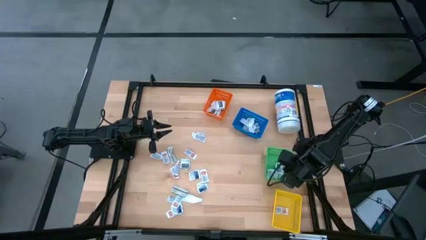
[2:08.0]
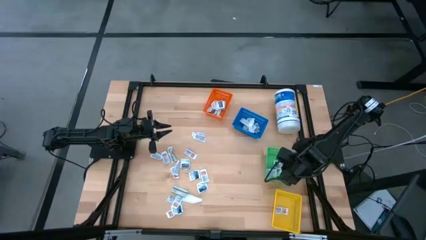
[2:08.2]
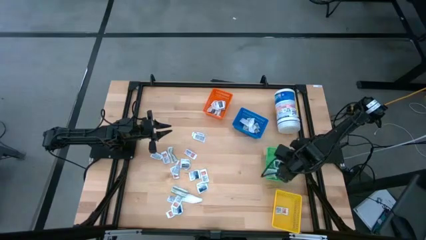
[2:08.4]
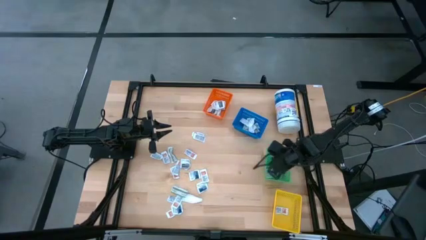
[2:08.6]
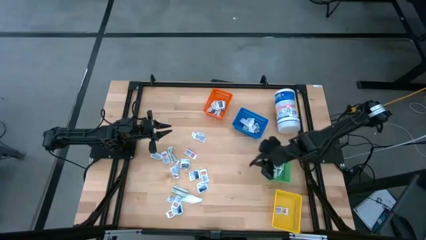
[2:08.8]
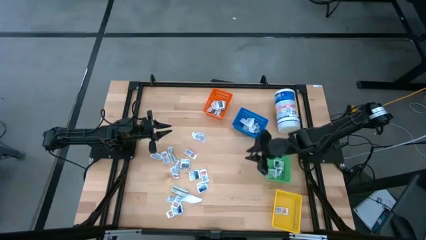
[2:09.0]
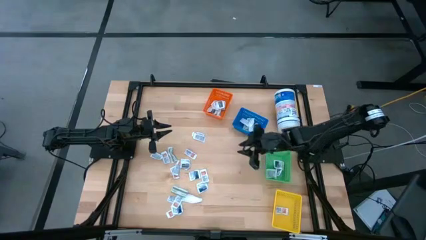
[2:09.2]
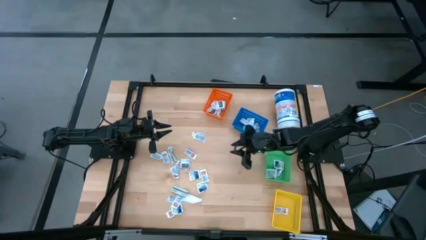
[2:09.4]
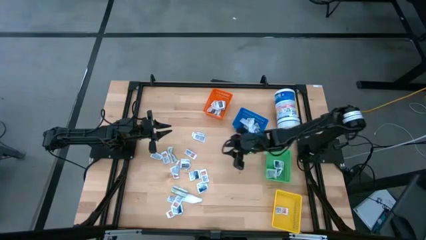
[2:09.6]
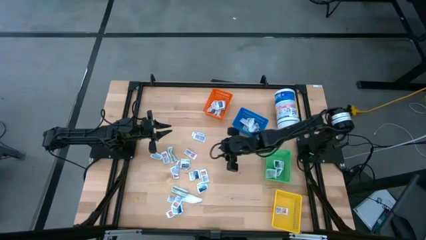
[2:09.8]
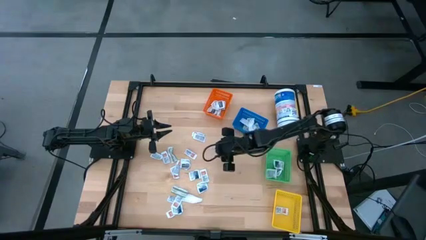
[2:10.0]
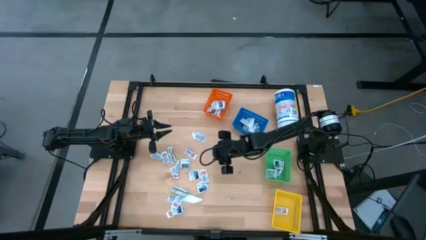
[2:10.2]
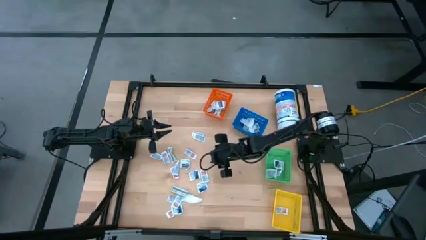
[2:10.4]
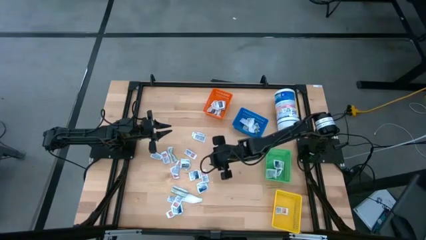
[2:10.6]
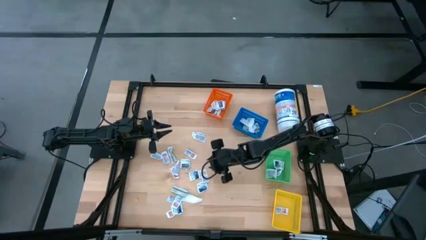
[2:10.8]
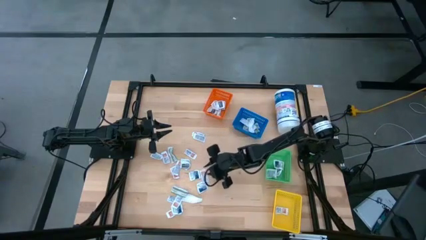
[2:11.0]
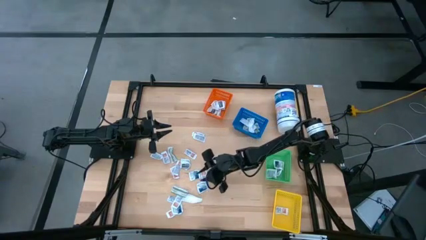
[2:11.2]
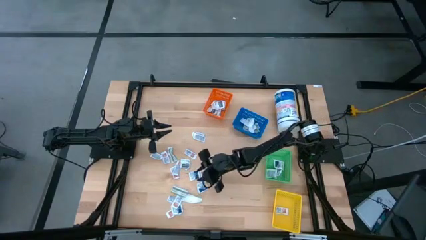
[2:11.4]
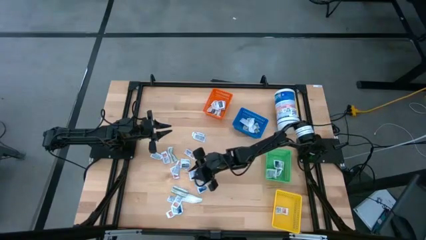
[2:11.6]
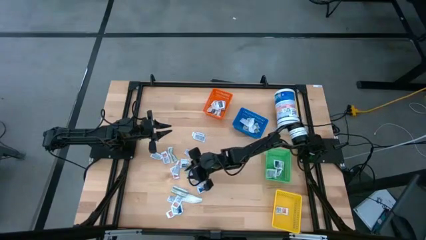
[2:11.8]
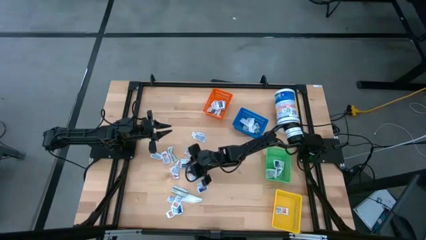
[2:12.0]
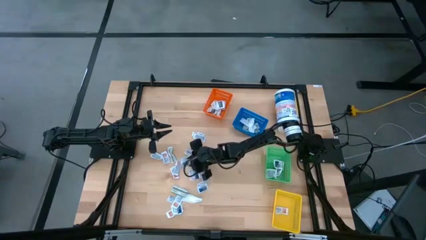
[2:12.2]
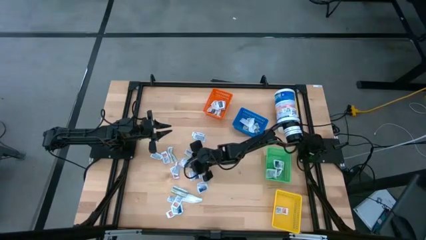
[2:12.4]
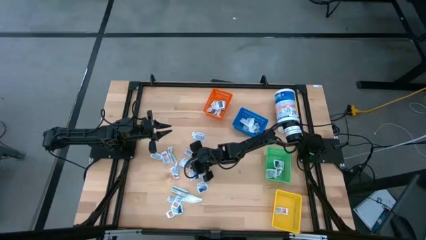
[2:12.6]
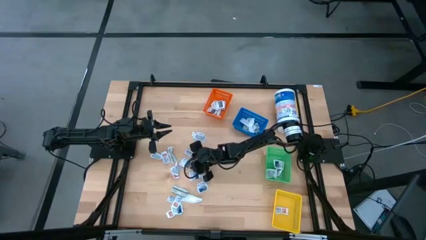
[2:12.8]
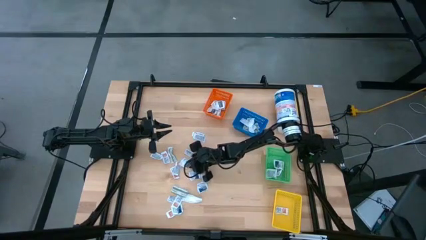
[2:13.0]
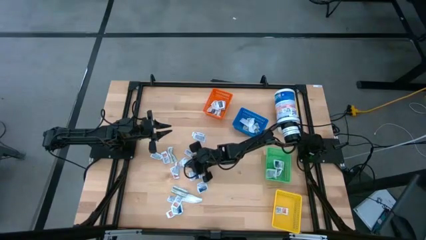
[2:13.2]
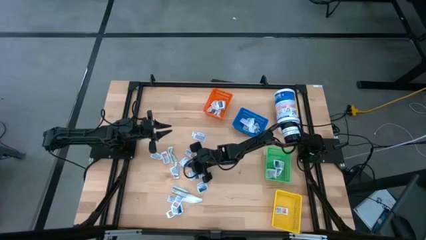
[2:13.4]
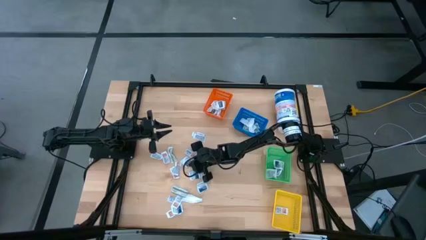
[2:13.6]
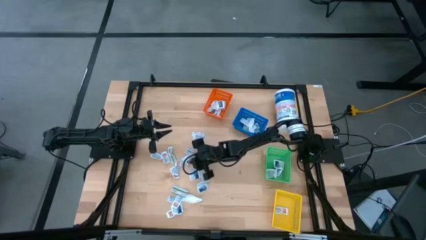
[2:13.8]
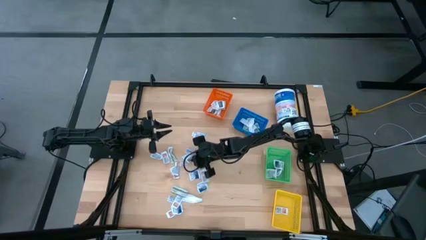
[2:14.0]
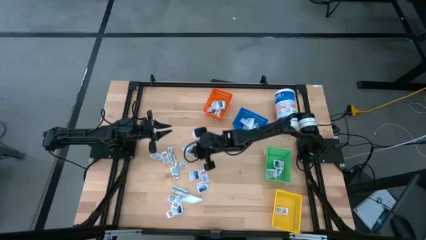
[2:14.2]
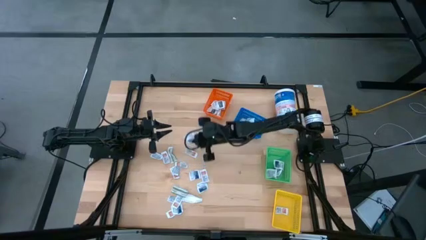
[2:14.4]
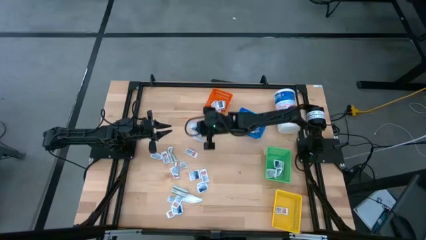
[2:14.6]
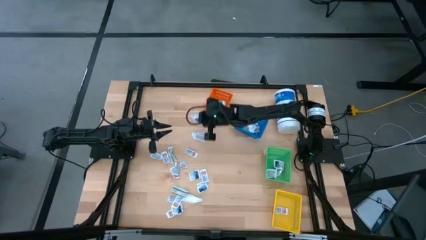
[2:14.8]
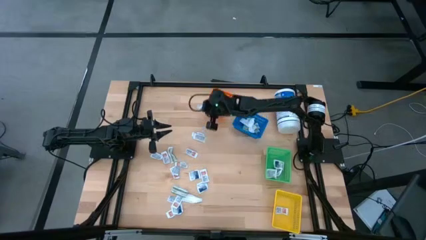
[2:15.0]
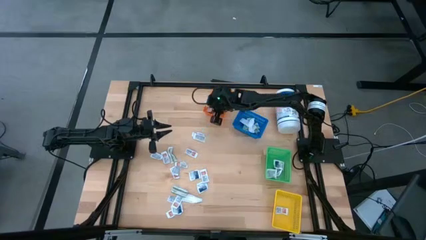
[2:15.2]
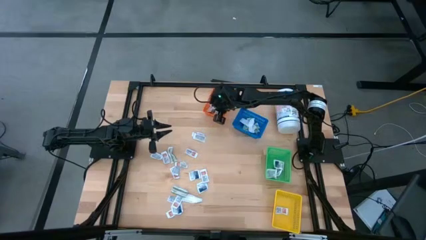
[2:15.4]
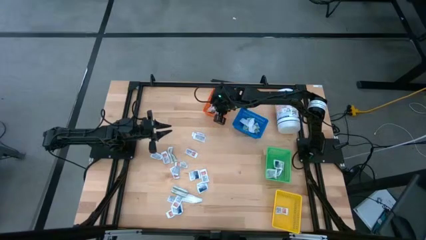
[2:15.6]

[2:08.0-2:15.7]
Task: Pick & Place First Aid Supplies
Put the gray towelette pack into the orange basket

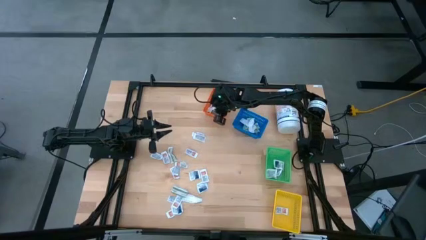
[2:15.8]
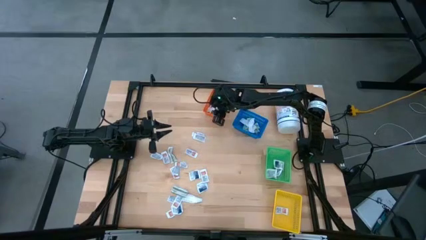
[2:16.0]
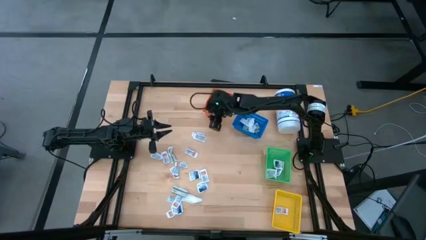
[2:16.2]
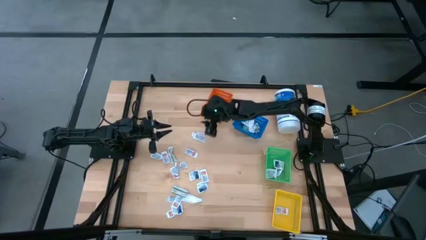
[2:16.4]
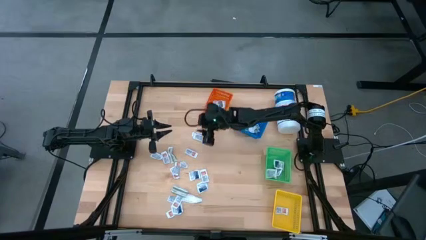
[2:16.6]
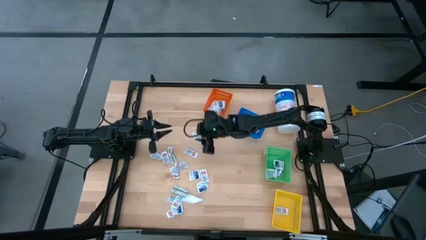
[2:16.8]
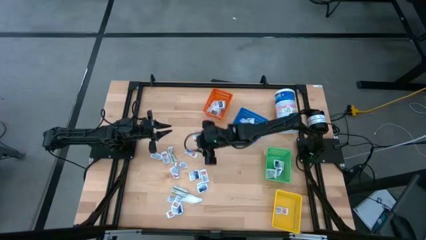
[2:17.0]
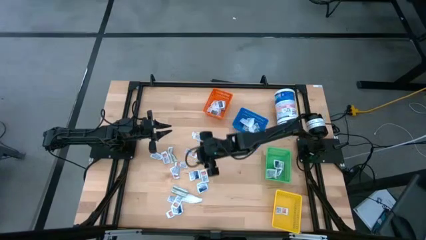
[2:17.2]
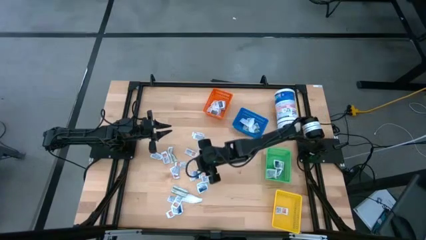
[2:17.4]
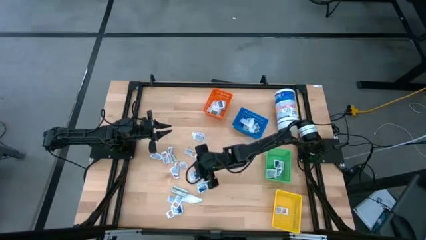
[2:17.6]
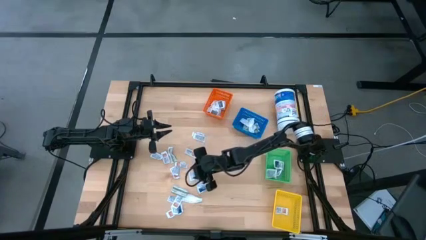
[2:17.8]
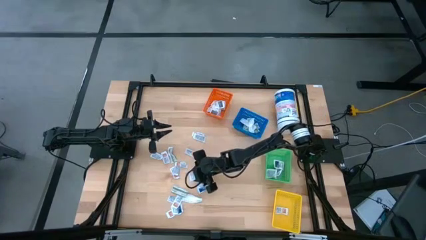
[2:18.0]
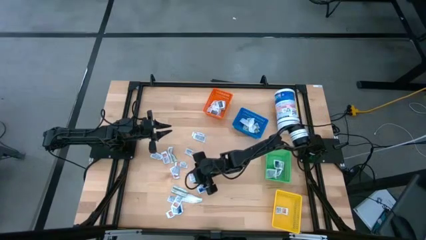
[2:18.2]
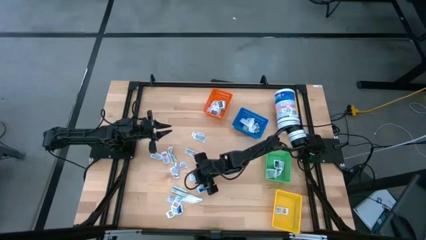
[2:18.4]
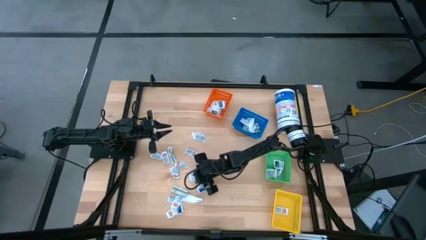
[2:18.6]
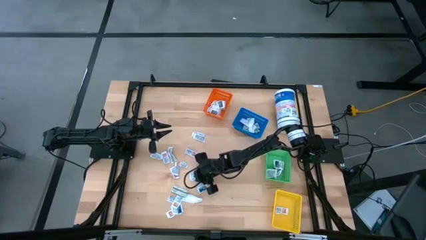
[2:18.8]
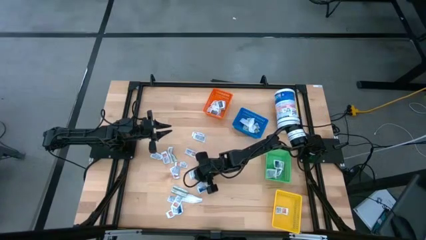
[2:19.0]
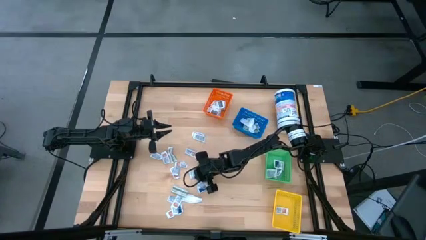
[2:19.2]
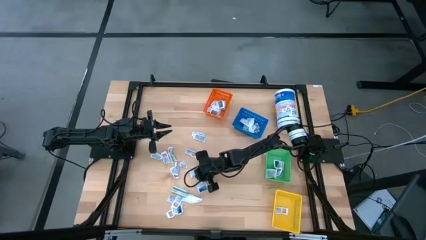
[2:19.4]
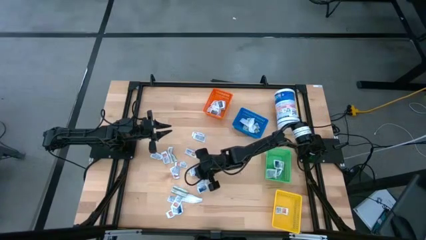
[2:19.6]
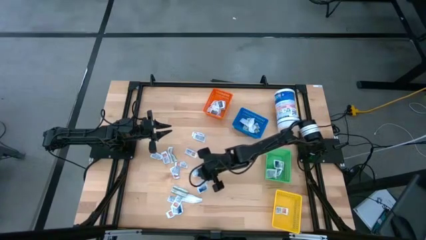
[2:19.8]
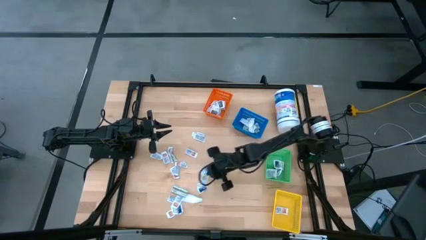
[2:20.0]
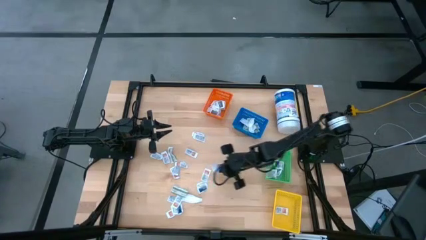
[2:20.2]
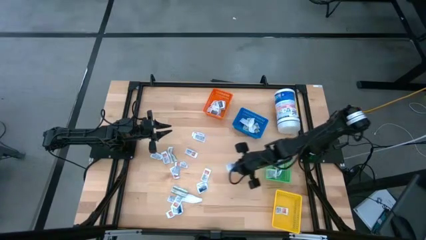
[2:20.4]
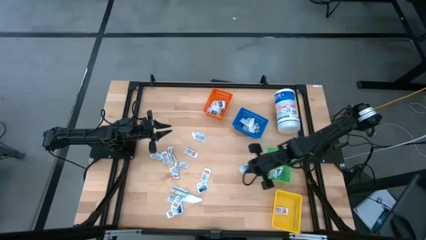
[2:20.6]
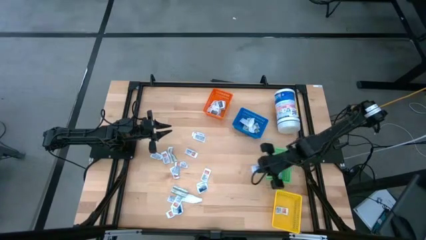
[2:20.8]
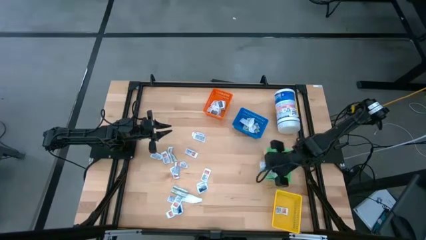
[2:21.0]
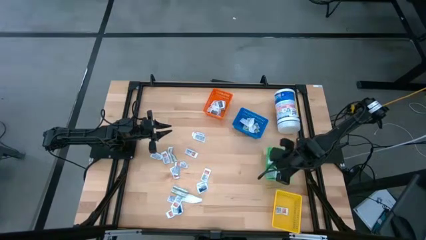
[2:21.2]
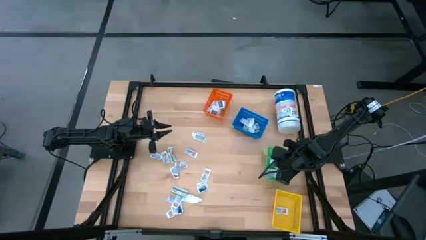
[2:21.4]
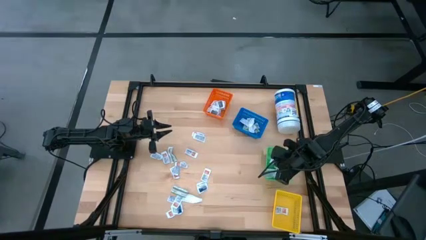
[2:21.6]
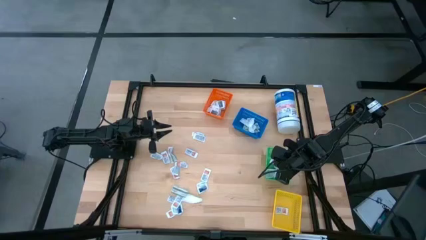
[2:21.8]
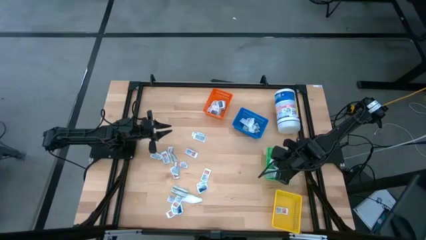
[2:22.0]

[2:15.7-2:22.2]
Put the blue alcohol pad into the green basket

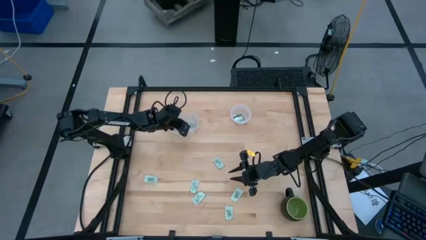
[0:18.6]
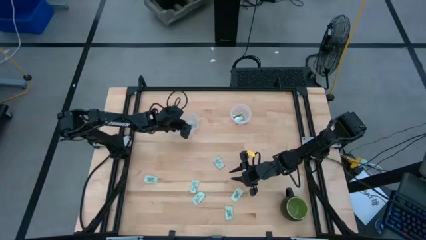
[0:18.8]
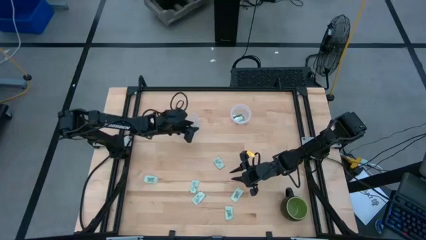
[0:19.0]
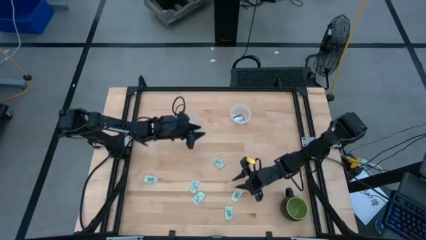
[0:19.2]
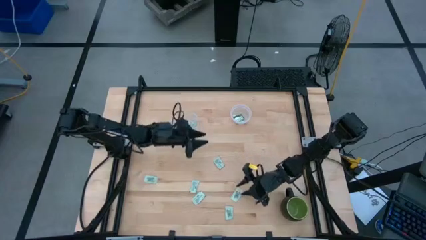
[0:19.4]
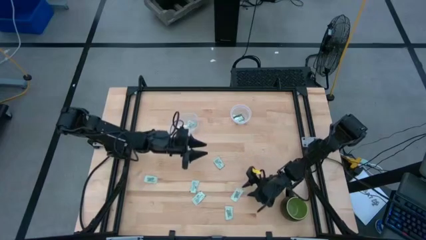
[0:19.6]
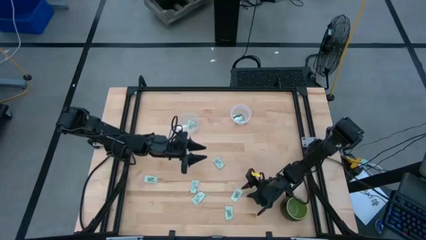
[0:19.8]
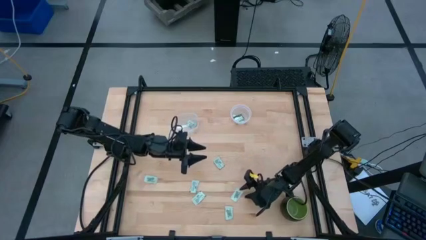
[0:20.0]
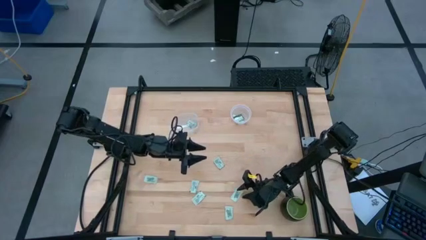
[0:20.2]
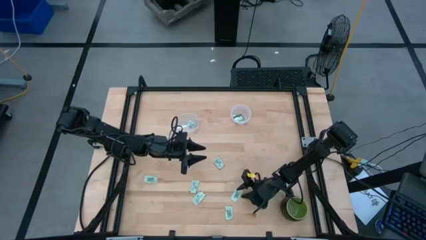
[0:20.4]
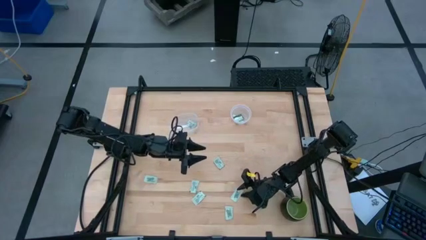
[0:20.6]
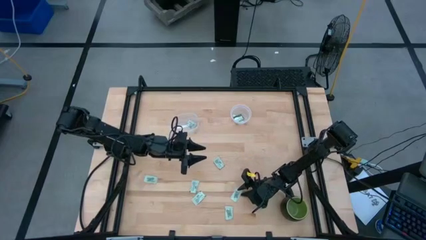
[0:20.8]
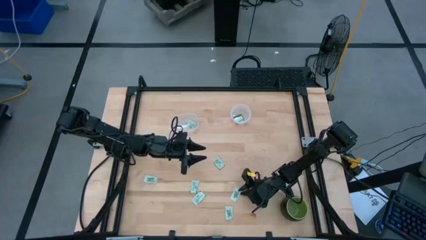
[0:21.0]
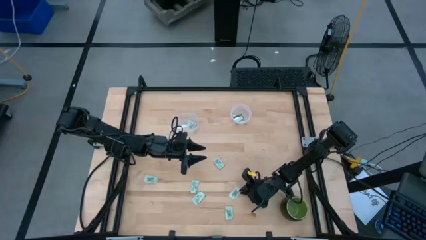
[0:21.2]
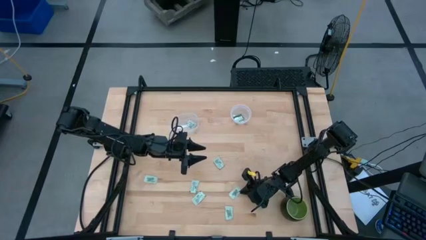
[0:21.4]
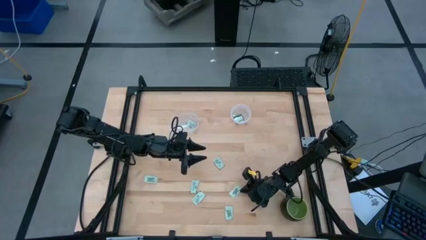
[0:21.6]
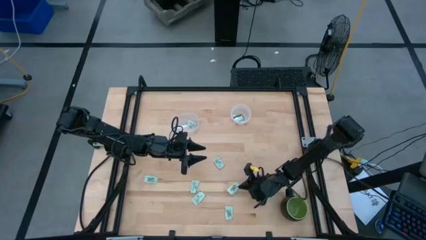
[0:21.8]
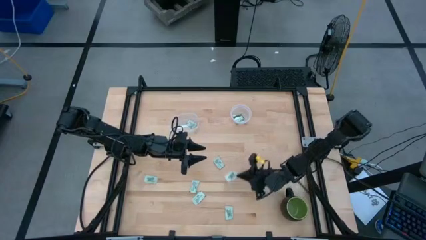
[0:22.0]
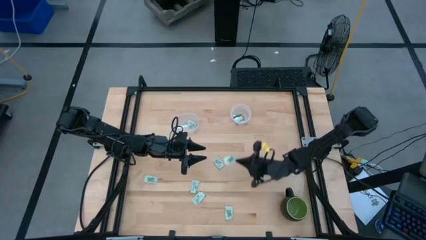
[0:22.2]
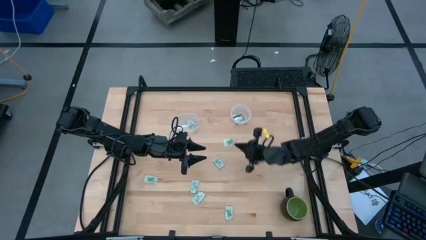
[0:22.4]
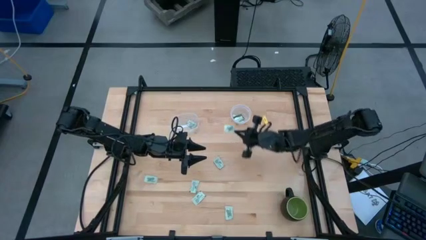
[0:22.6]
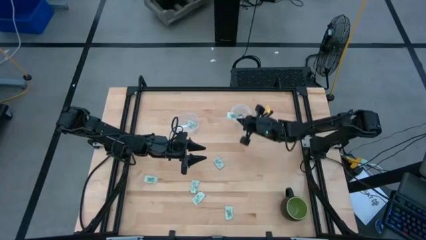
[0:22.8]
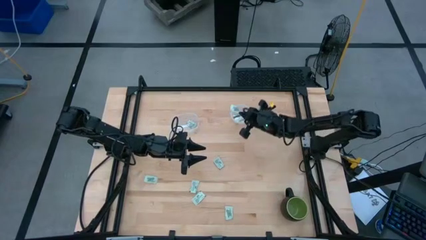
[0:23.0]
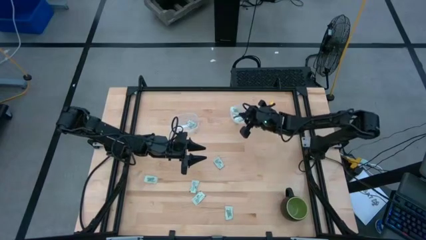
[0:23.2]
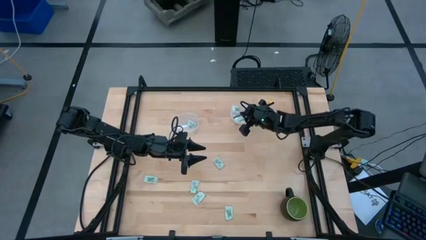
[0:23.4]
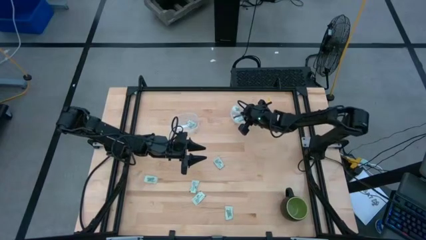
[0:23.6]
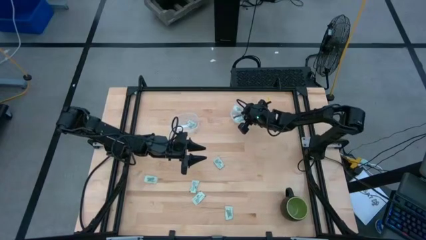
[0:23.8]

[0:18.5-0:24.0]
Task: Pick and place Stevia / Truvia into bins
Put the stevia packet into the right transparent container
